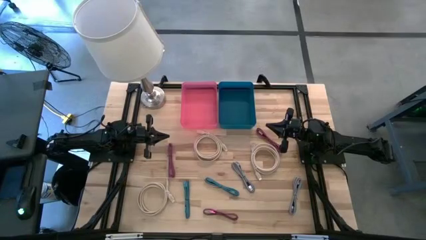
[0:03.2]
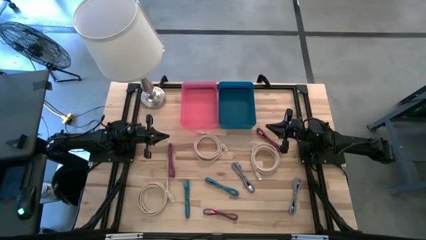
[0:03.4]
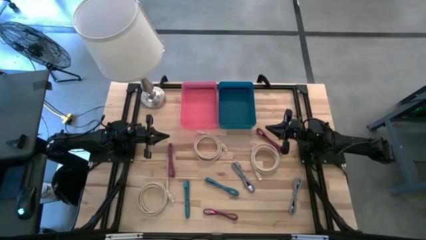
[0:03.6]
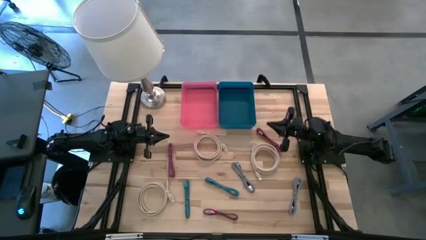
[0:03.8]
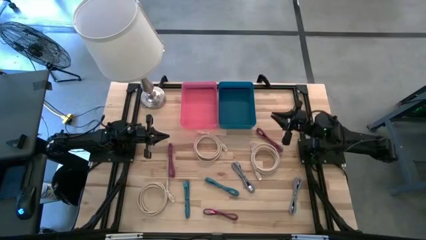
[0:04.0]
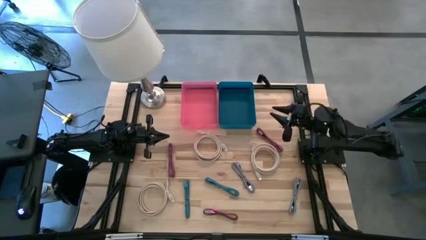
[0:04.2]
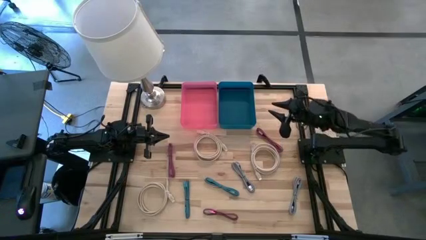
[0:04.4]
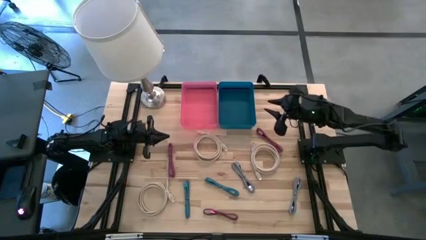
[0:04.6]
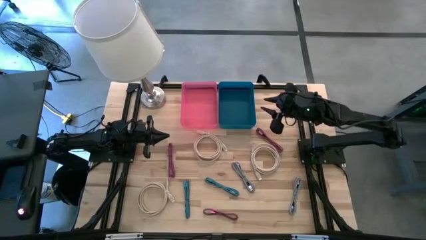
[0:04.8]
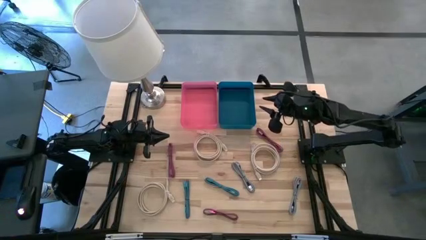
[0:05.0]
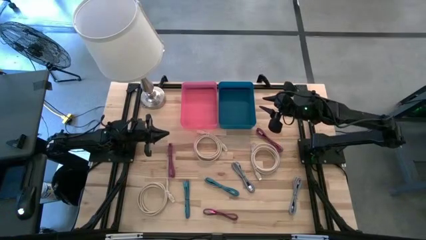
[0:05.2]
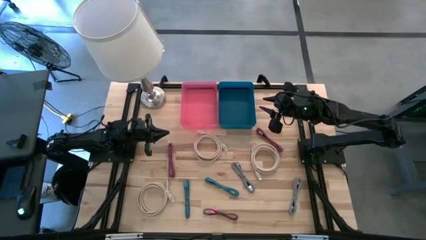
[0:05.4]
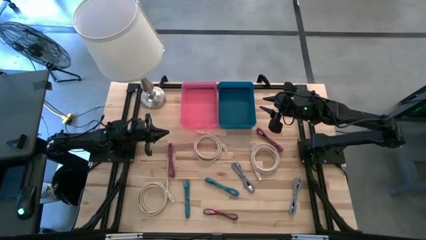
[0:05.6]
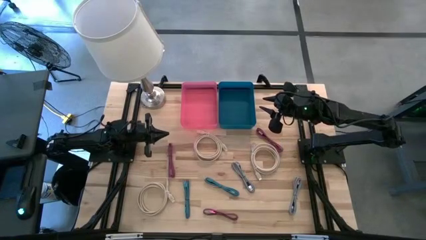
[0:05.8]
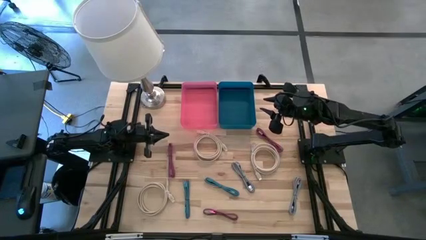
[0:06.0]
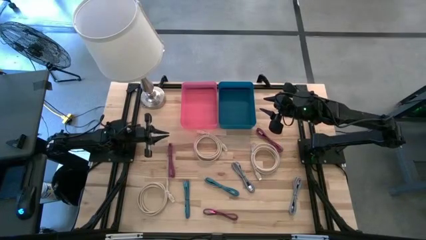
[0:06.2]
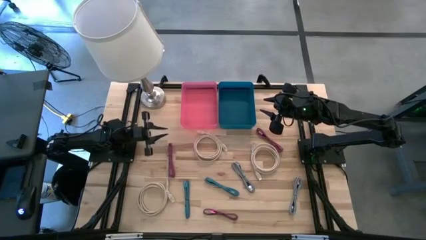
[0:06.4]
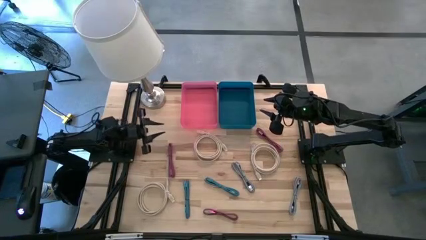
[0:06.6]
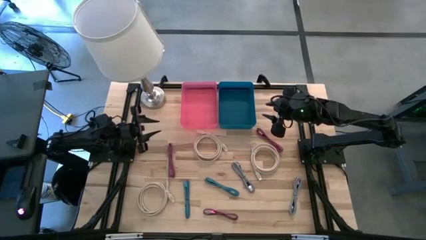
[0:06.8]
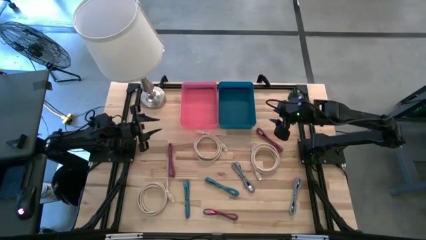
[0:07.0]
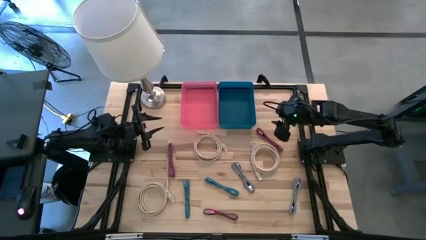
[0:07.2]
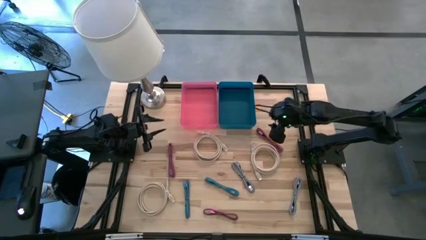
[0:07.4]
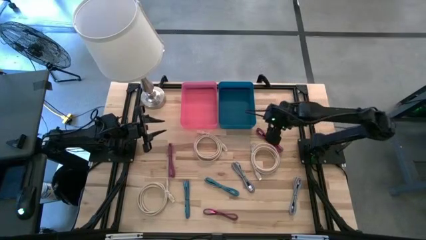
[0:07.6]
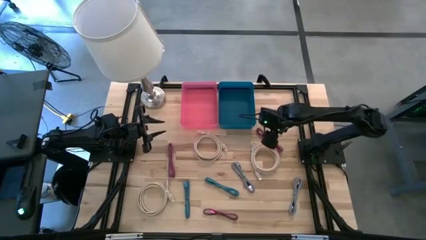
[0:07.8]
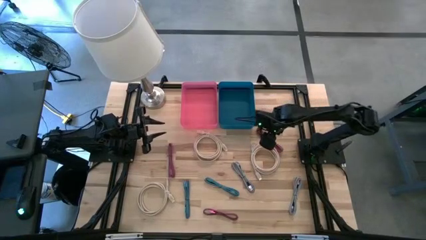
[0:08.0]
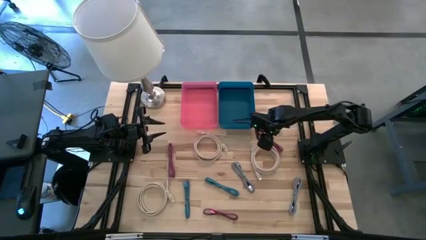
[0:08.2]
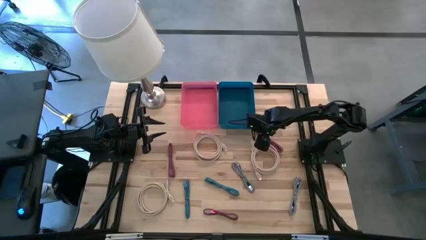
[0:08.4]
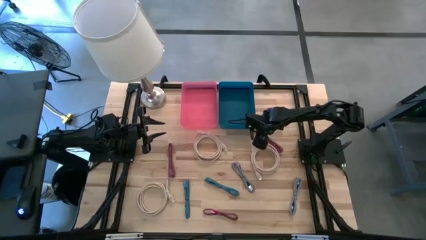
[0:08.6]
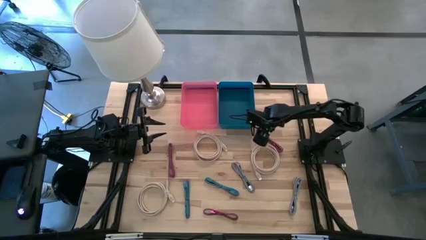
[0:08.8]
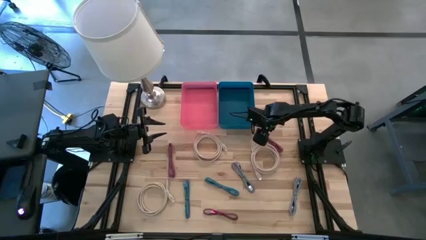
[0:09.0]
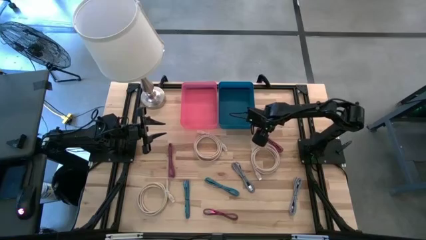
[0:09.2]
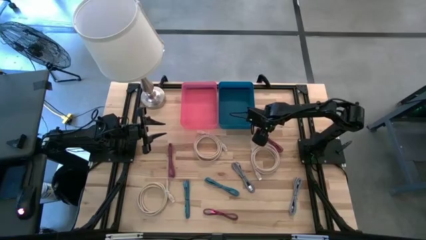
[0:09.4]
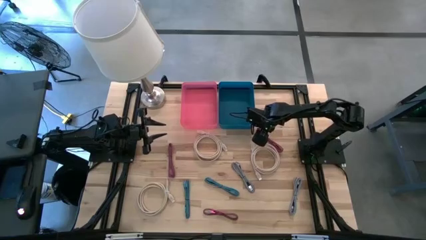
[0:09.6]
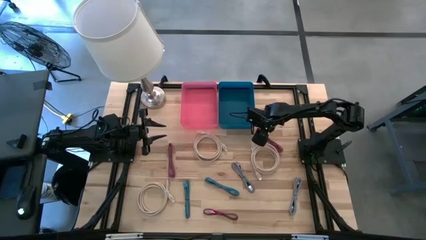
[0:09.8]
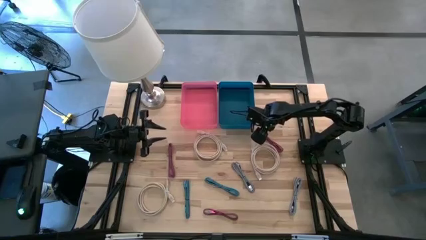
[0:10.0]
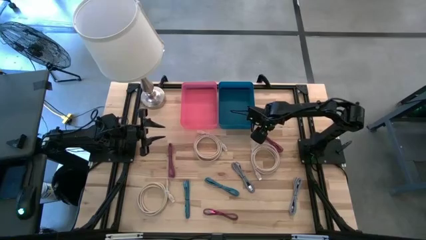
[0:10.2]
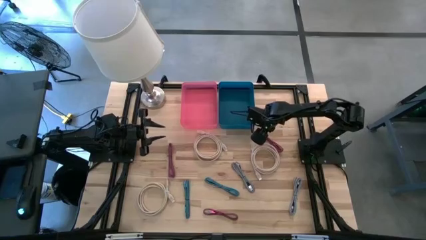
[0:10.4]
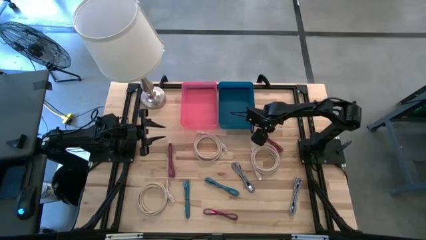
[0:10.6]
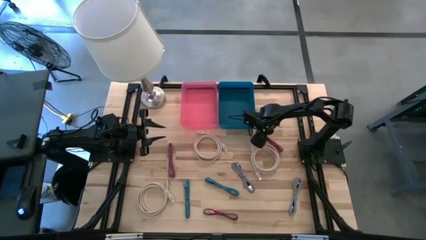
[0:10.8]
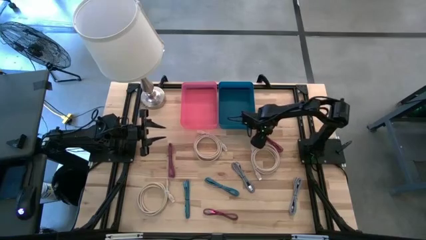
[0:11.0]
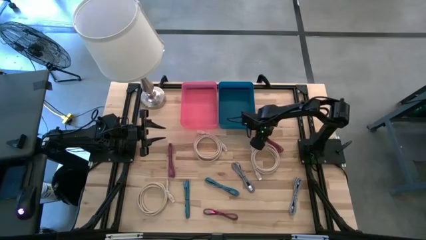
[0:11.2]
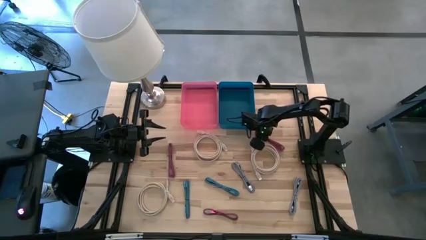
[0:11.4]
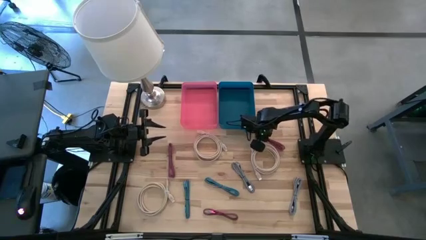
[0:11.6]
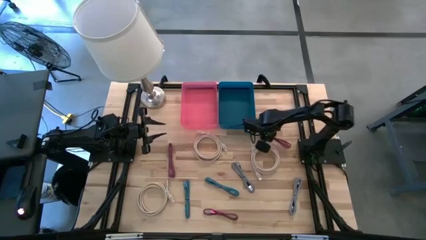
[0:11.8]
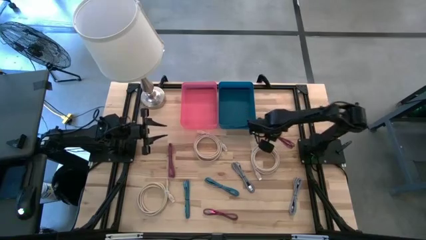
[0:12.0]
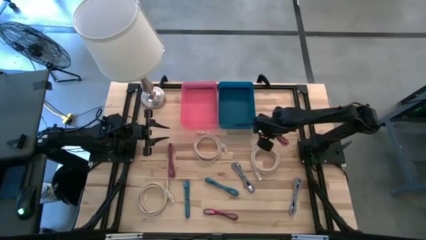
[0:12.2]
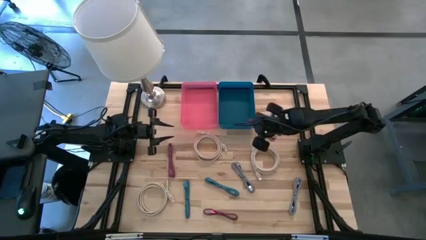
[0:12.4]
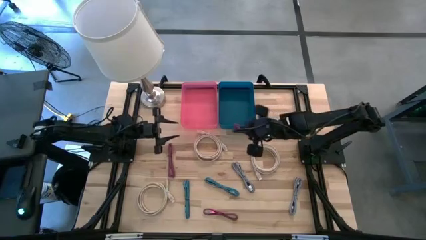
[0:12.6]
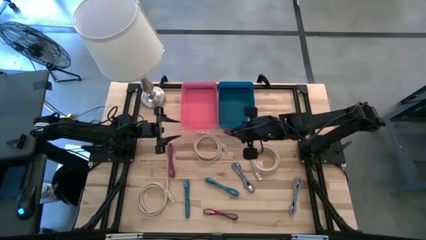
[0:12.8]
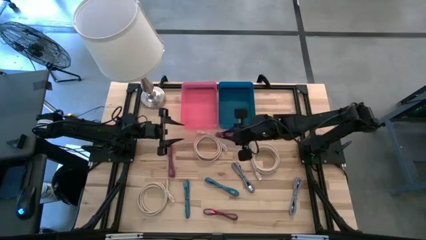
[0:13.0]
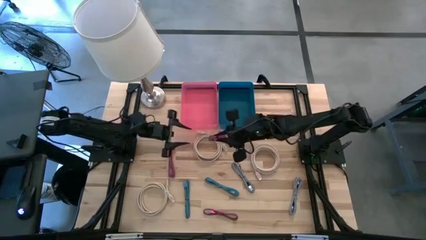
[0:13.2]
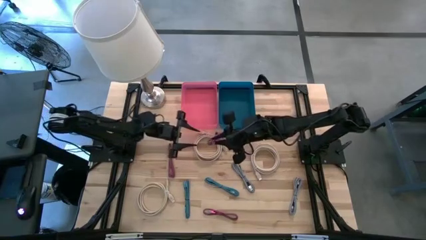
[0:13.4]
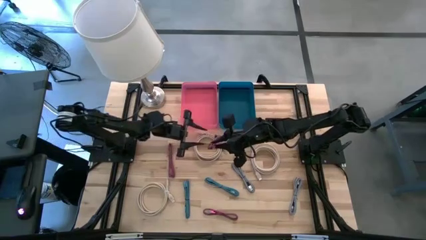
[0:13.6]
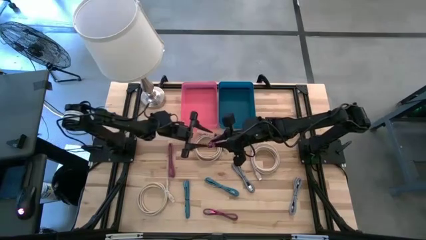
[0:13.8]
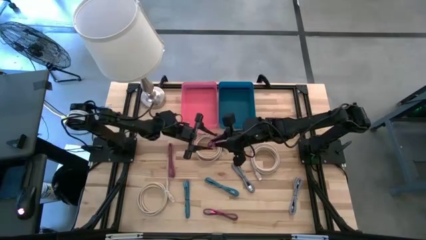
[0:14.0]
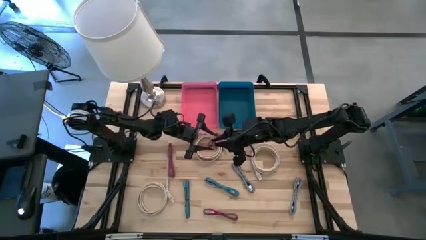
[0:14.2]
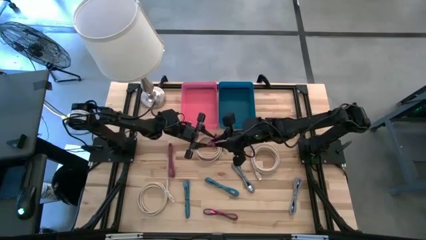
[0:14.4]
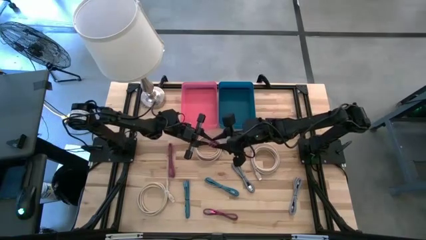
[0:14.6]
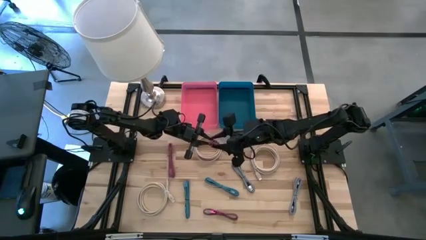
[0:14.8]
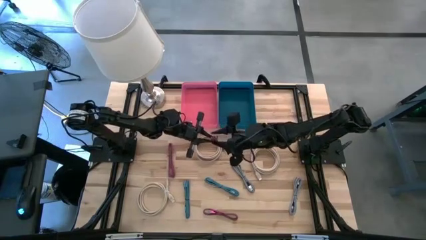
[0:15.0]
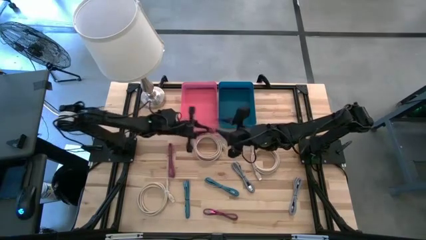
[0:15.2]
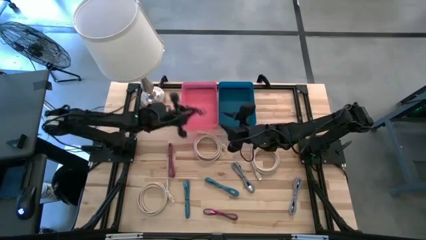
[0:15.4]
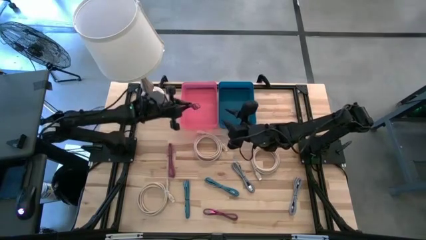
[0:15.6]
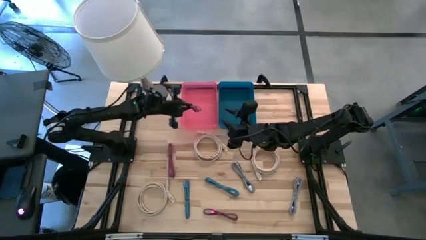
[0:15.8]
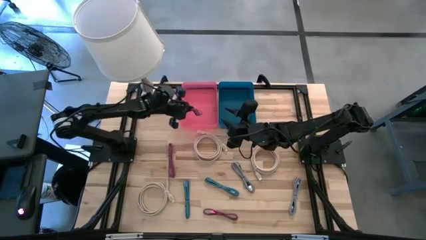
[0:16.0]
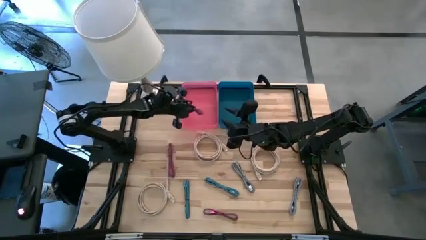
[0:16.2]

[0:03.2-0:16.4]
Task: Pick & Place USB Port
Put the top pink charger cable into the pink bin

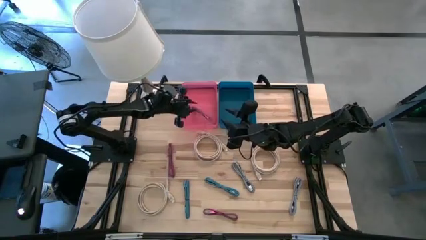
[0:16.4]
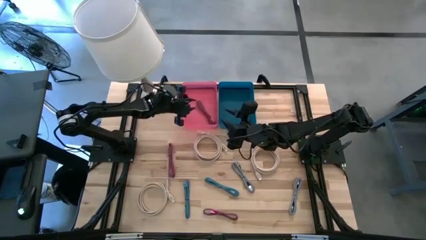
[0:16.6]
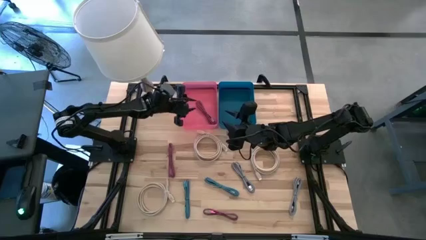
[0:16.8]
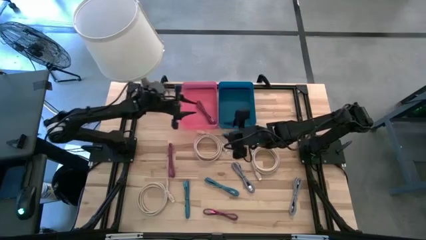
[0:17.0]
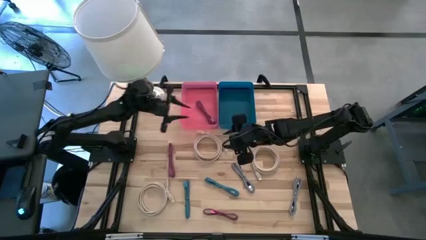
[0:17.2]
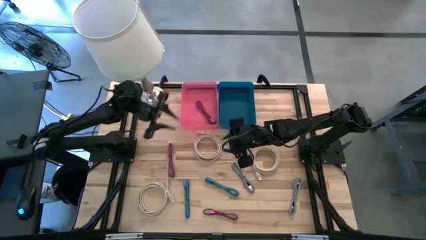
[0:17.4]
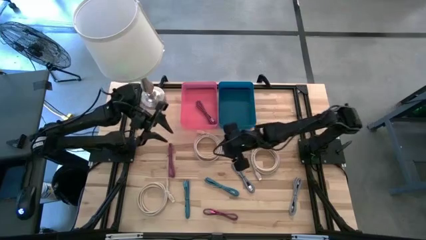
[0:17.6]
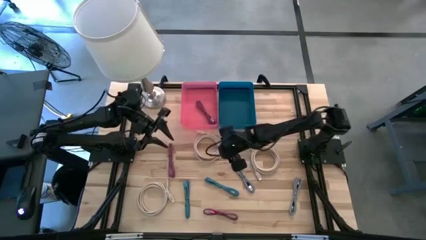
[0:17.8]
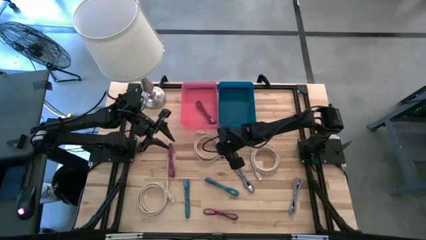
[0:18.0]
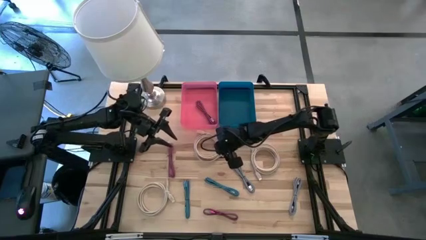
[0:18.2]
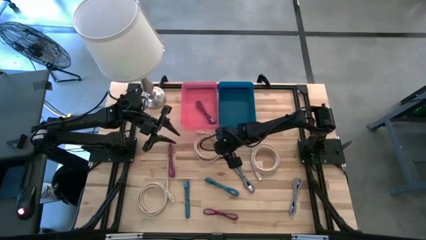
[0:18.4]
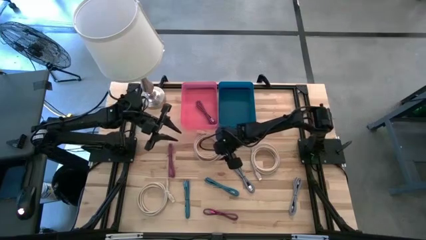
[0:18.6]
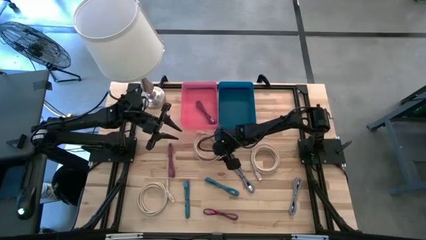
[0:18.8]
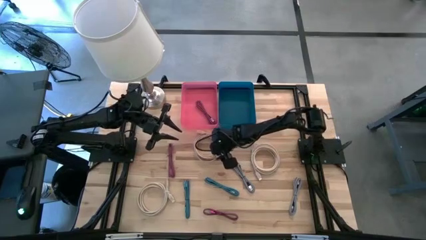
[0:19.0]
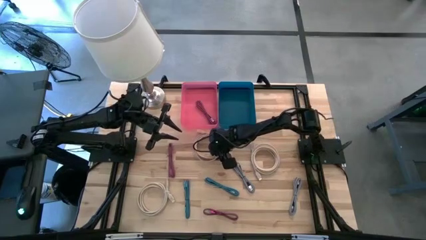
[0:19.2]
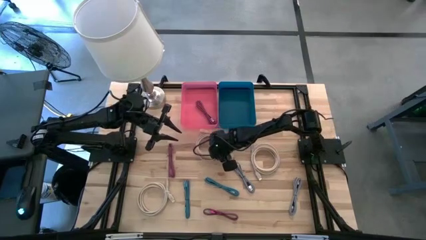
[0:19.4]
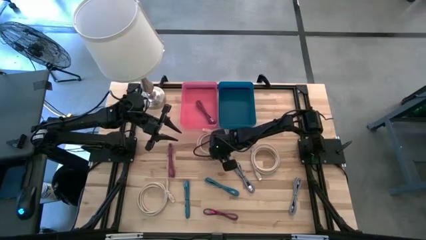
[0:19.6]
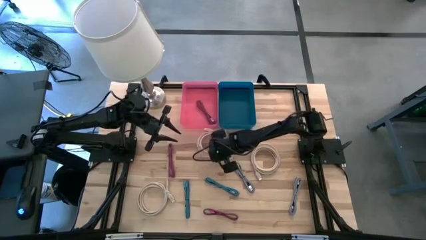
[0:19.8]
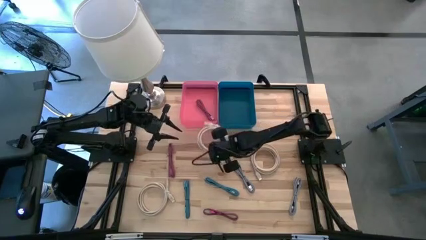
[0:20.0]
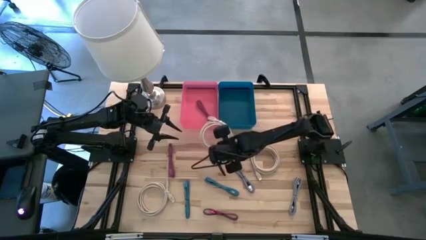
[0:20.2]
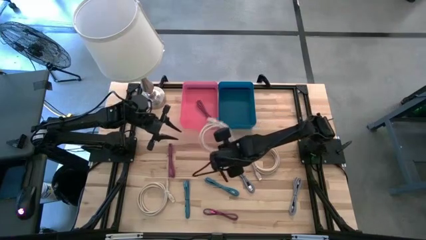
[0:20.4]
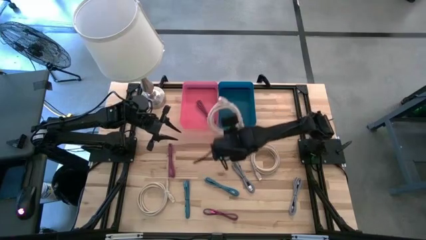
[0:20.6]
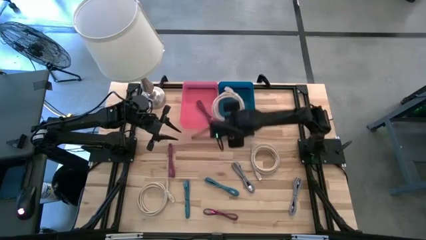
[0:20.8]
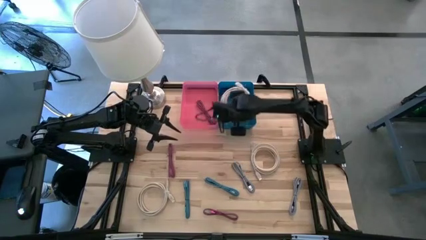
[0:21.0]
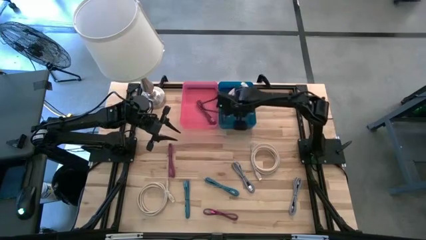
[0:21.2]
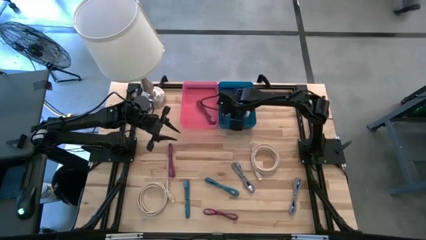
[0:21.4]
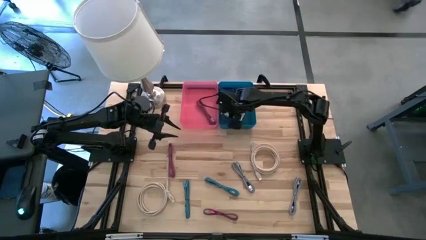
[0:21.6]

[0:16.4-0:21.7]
Put the middle white HDMI cable into the blue bin
